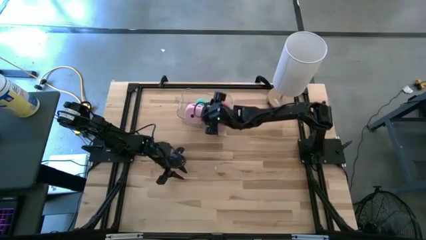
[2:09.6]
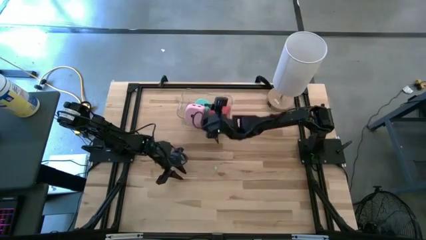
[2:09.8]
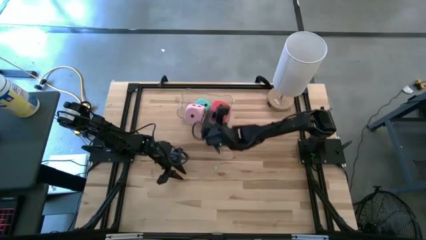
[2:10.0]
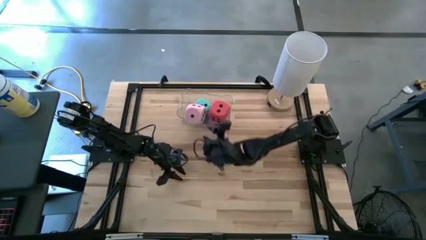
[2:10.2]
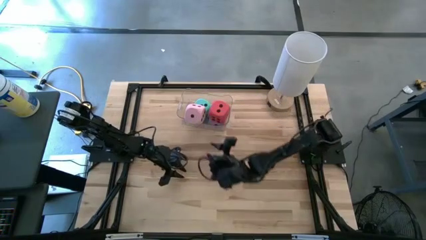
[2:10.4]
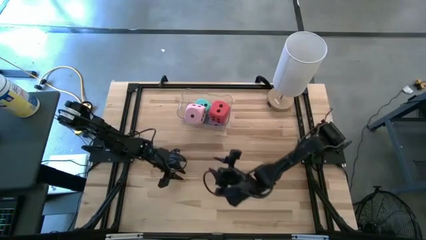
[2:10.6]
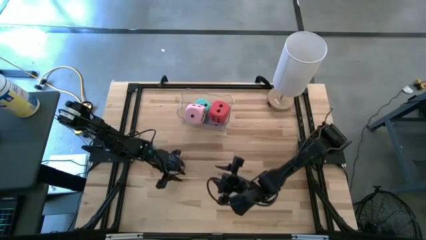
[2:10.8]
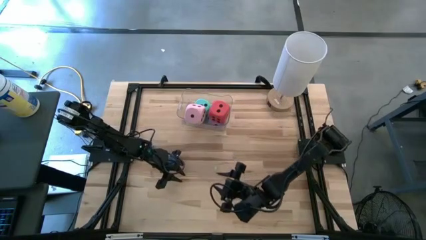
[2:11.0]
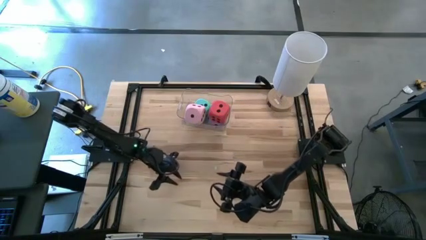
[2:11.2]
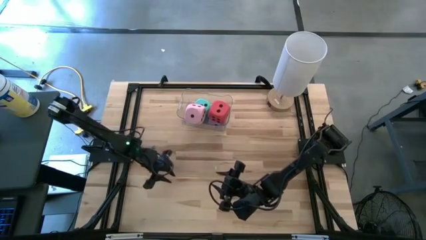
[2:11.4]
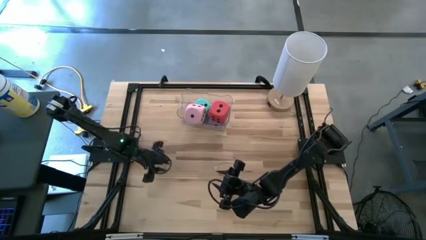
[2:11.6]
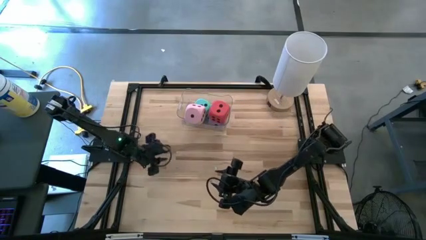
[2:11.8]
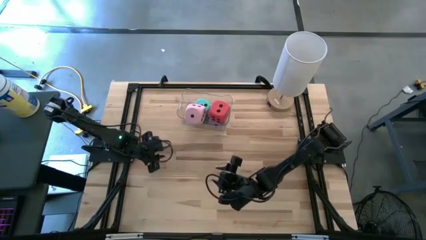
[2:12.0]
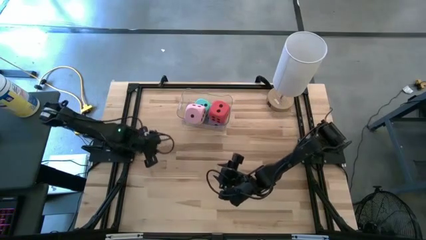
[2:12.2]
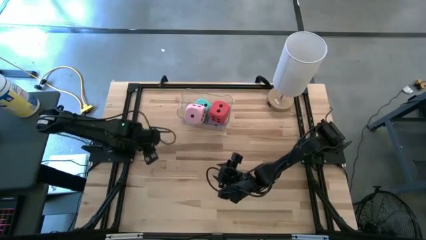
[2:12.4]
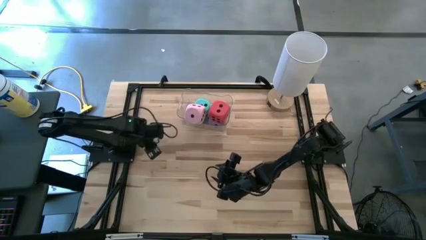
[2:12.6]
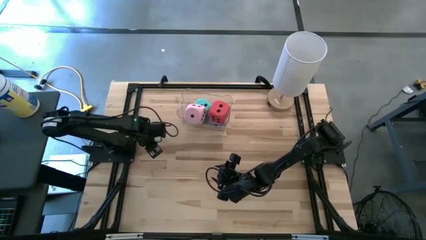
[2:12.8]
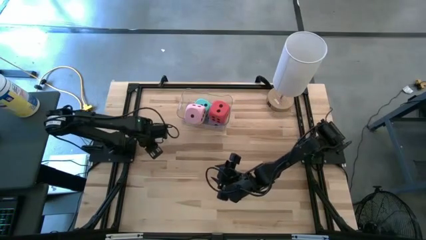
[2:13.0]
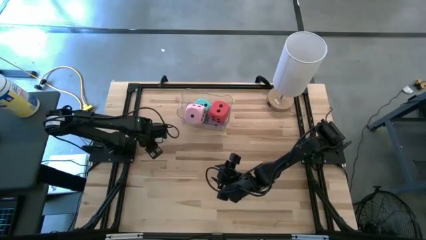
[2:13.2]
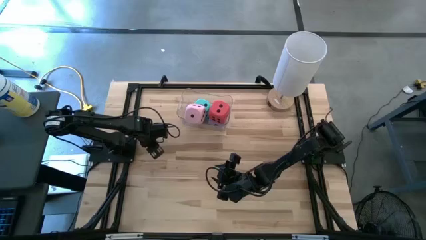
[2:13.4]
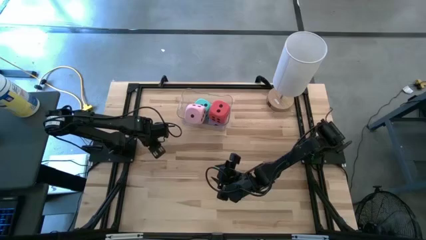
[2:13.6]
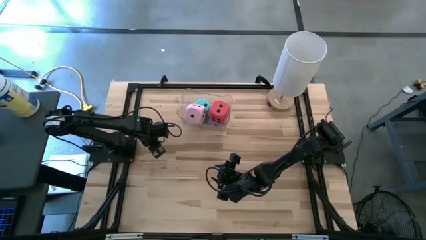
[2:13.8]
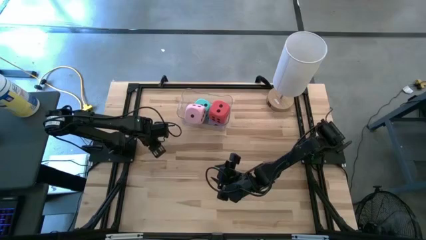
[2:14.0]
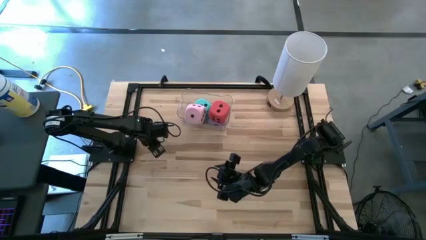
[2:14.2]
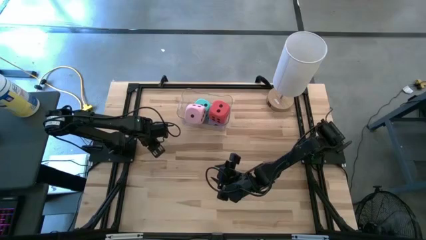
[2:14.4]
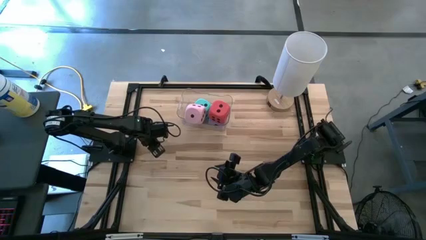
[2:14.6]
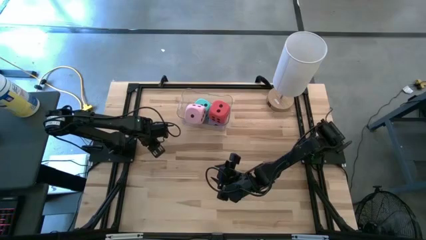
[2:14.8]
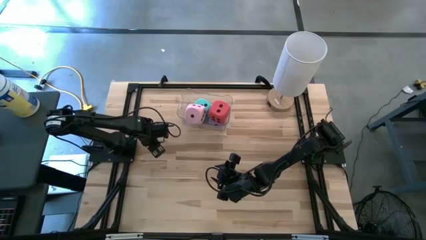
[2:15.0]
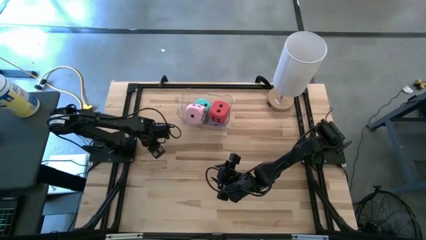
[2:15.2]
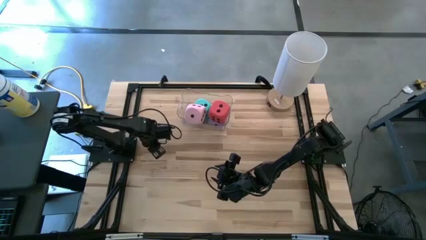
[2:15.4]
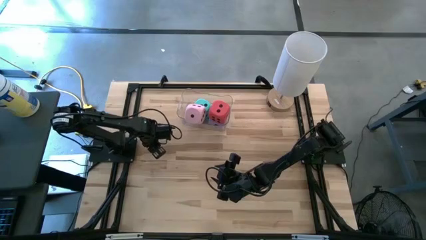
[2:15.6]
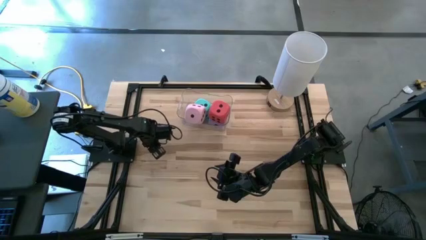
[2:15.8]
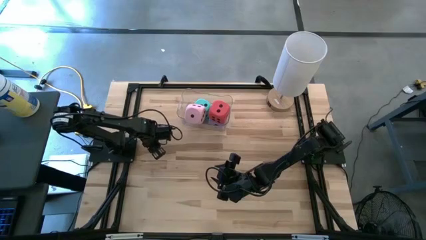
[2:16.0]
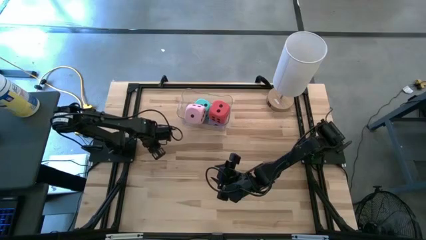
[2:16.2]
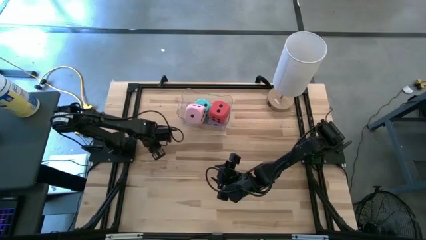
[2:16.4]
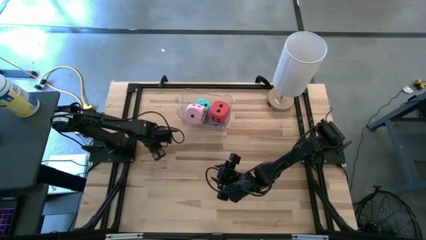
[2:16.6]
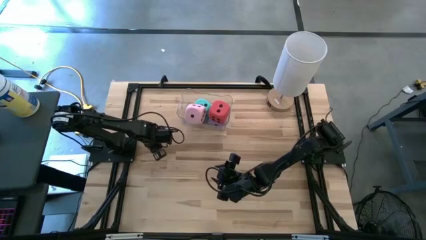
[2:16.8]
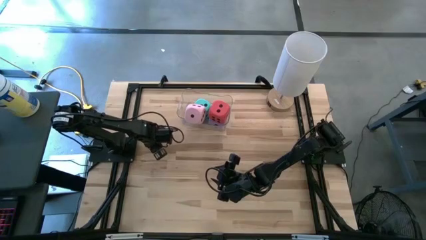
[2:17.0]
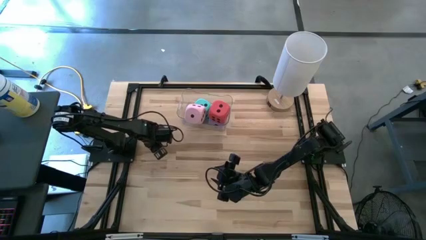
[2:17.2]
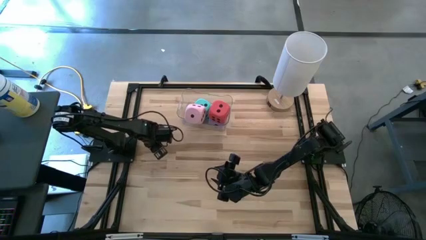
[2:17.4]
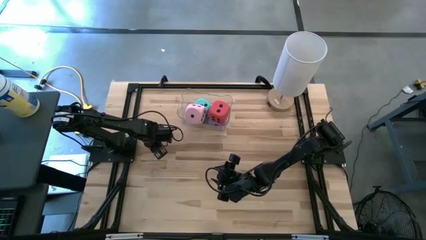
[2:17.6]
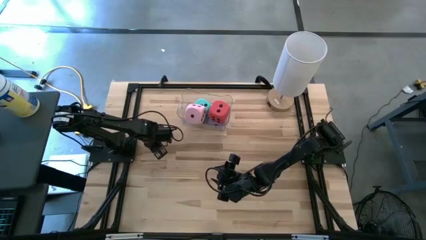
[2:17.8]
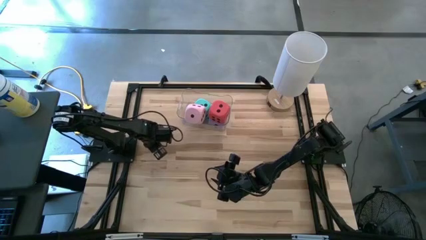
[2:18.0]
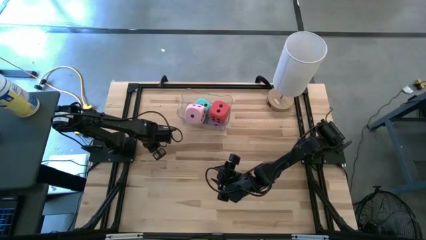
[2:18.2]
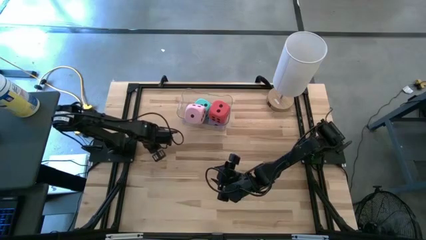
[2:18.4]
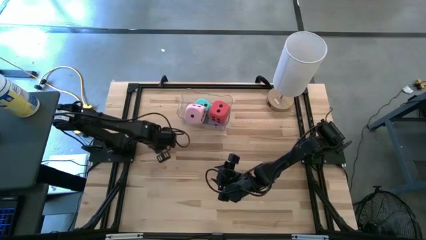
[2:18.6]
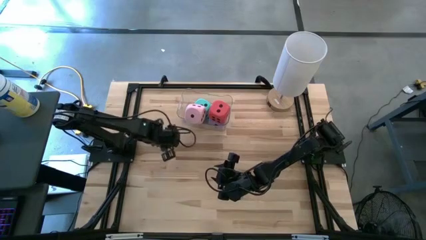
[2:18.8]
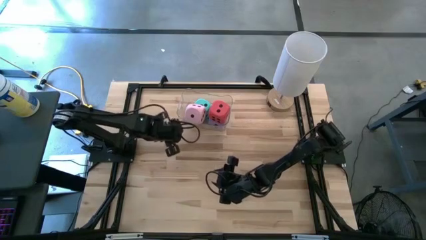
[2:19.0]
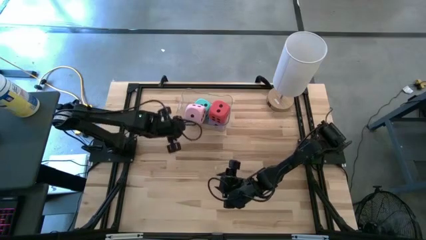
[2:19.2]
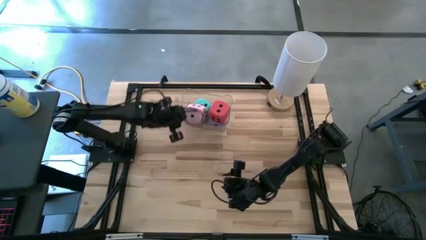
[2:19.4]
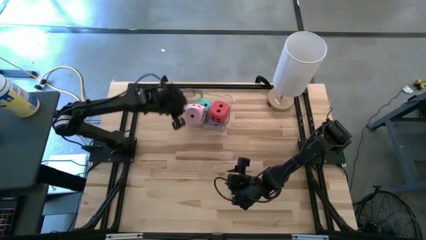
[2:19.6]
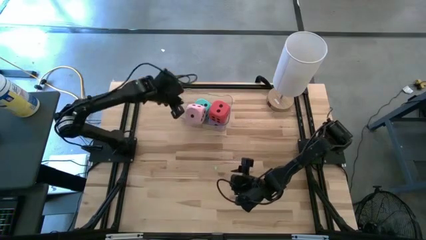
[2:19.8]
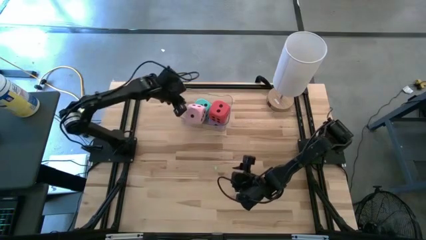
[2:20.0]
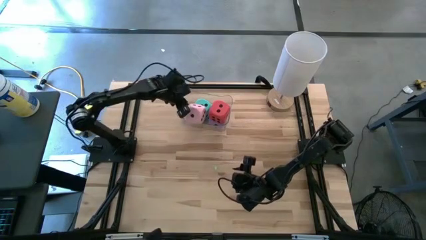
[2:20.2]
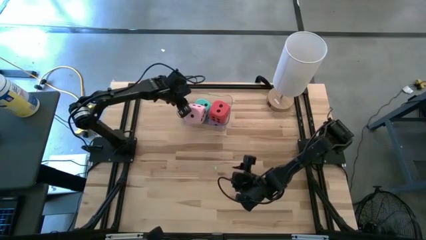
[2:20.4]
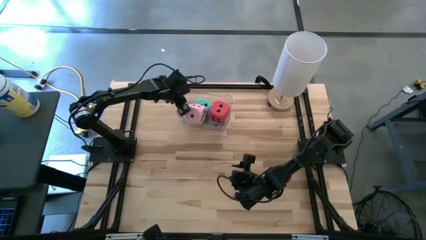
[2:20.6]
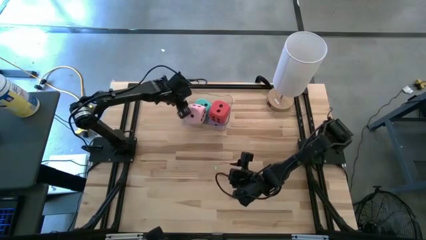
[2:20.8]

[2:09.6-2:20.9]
Task: Pick & Place Dice
Put the blue dice into the transparent bin

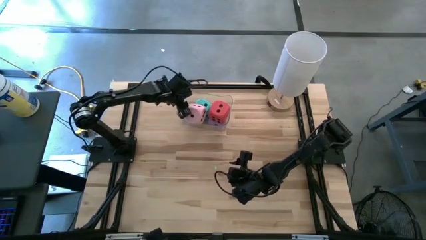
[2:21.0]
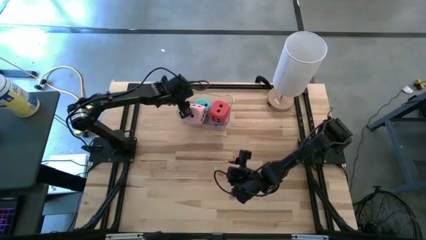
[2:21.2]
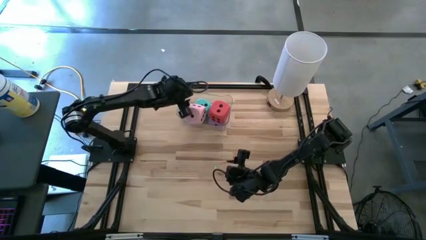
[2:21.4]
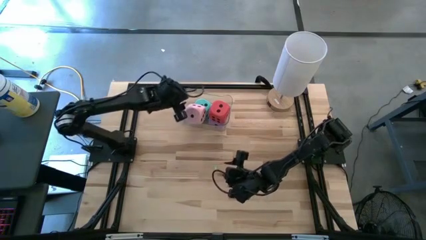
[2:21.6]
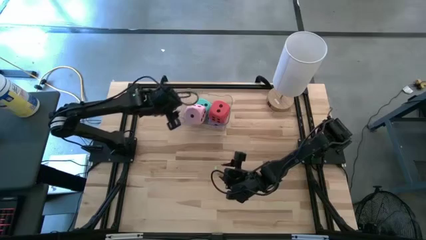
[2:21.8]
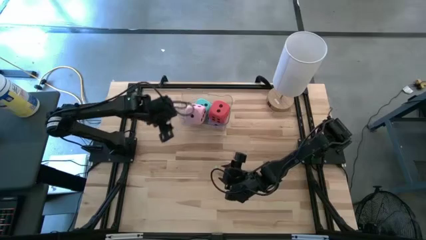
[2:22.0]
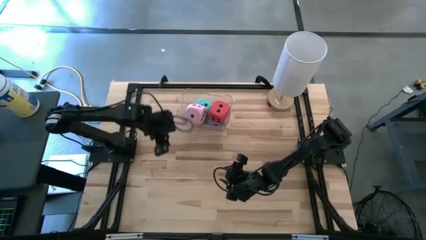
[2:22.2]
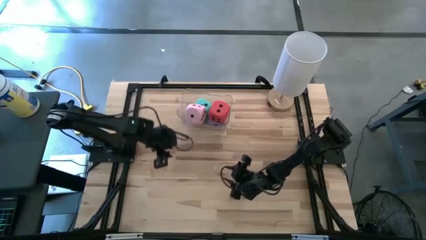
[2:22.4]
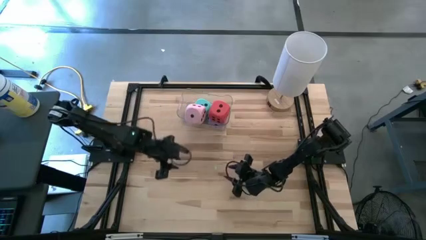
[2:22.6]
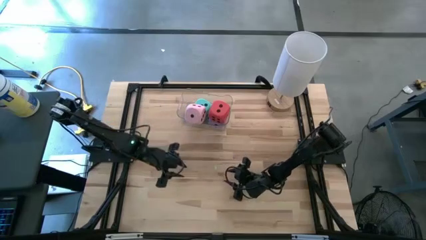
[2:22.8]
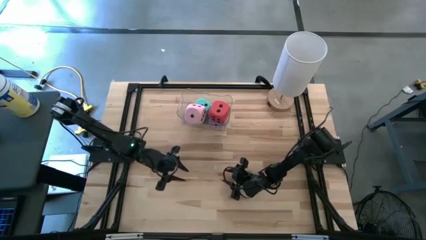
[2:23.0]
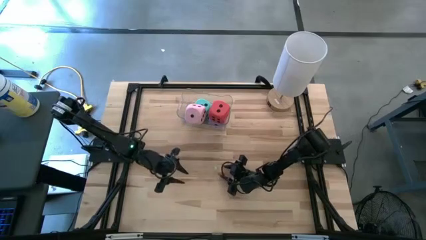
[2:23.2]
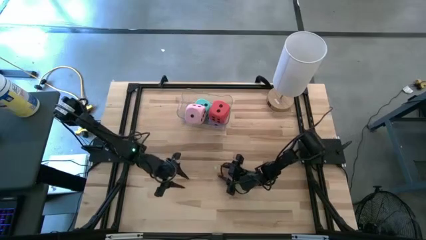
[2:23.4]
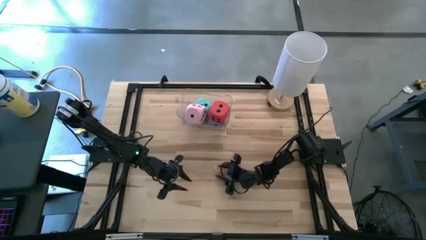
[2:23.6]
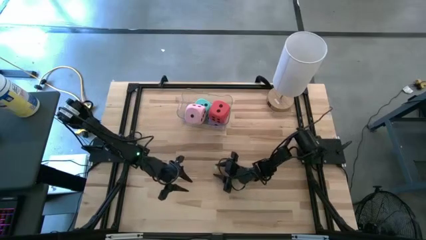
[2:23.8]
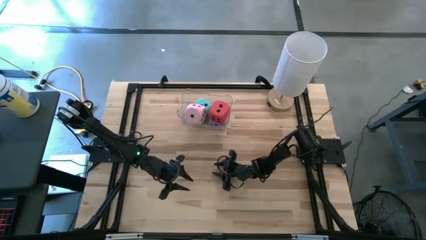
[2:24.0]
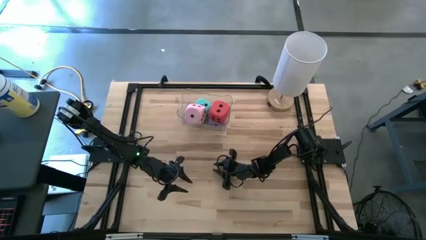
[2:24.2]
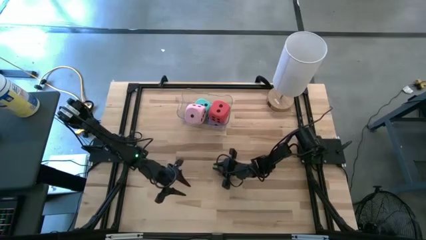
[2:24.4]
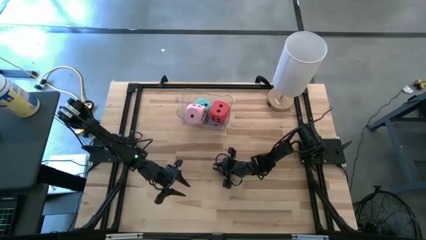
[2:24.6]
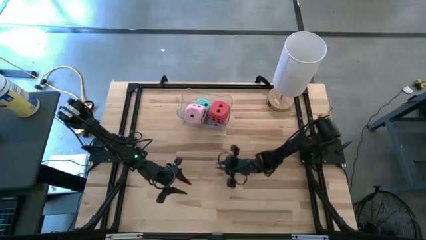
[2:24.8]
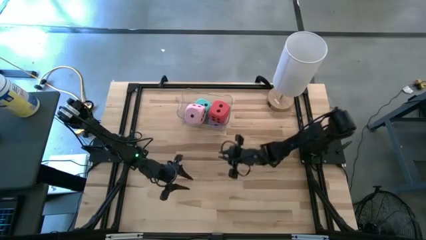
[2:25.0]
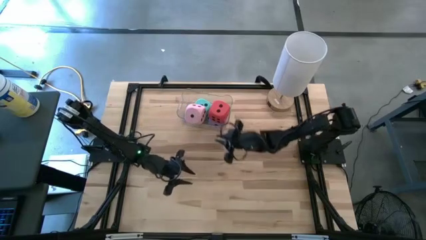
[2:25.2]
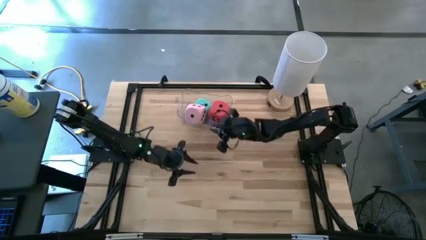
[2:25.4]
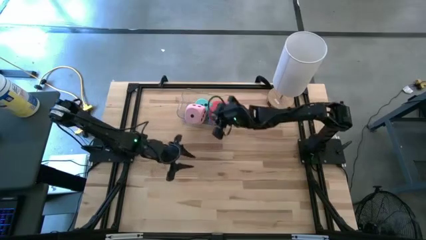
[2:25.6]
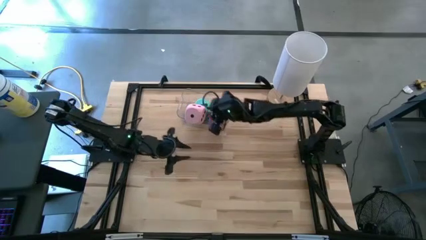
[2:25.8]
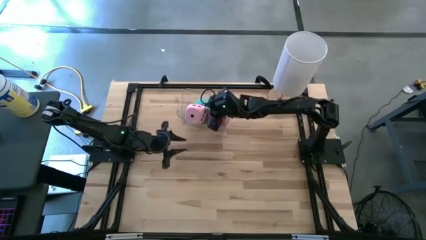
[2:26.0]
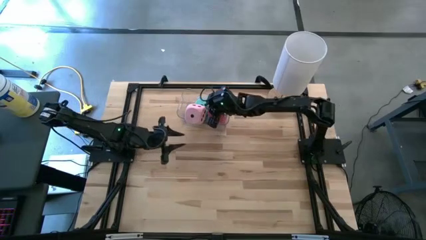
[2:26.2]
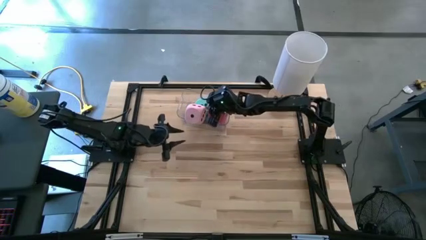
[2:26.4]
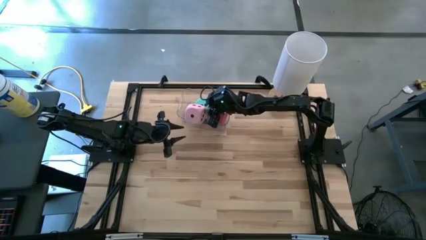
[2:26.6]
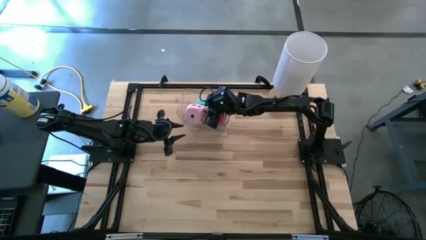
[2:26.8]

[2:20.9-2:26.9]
Put the light green dice into the transparent bin
